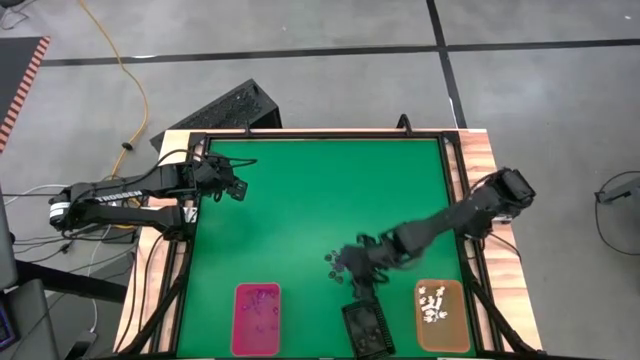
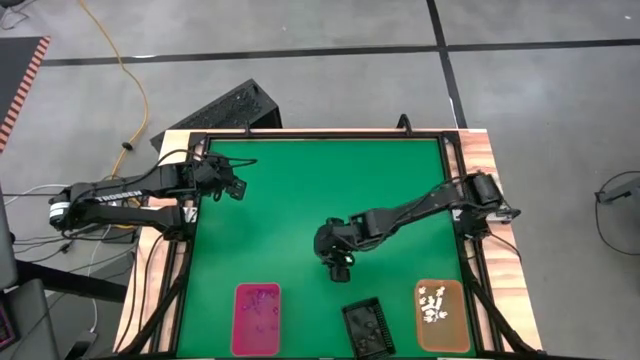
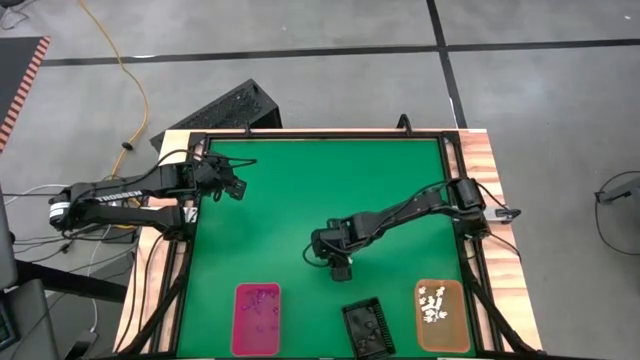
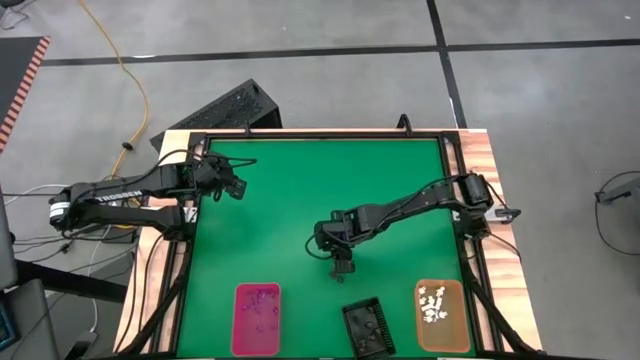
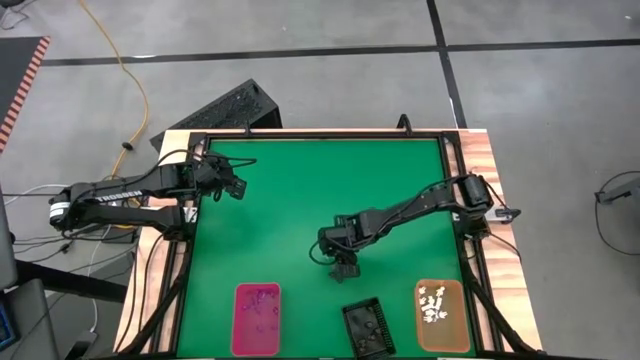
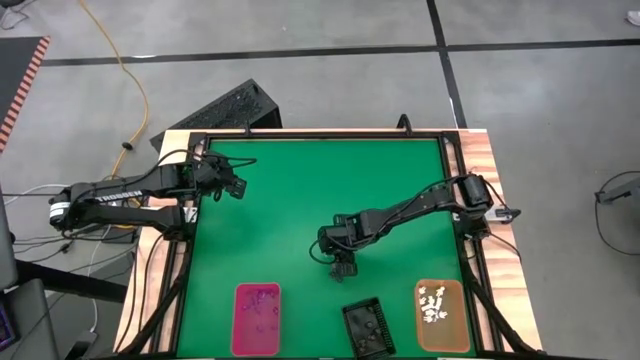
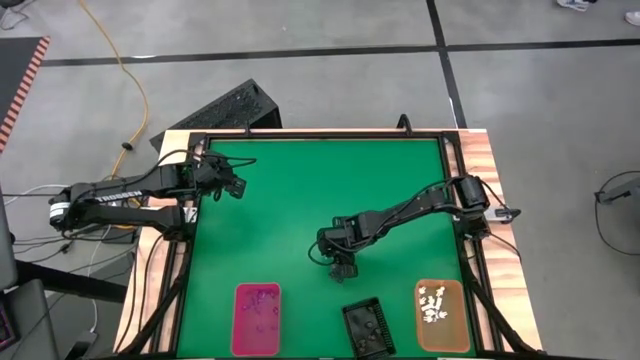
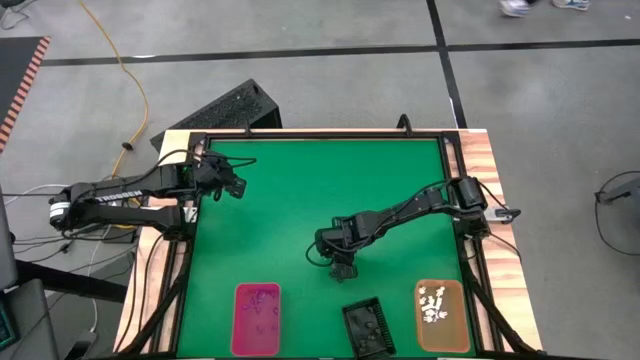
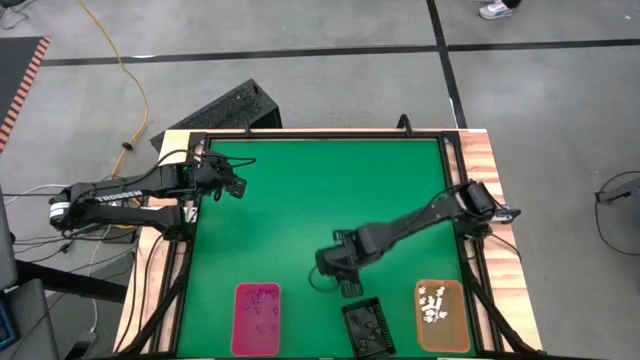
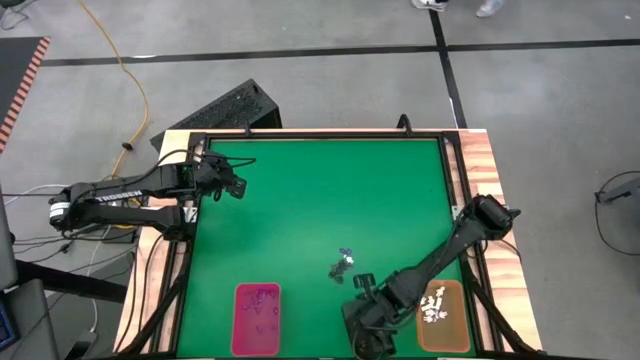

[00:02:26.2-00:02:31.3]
Task: Sort Halloween decoration
Put the black skull toy into the black organizing bin

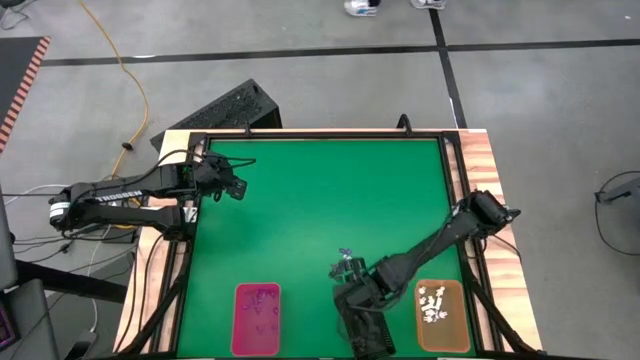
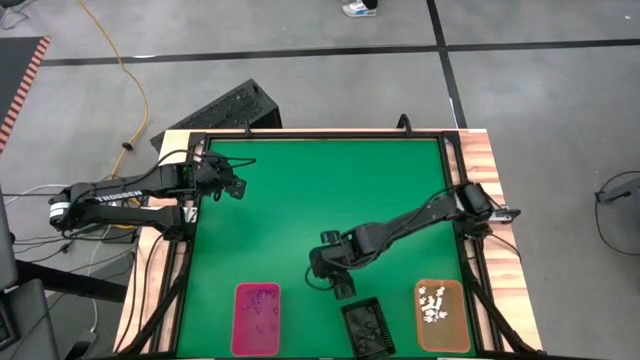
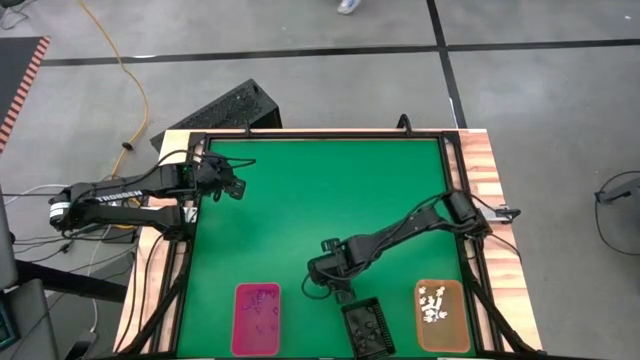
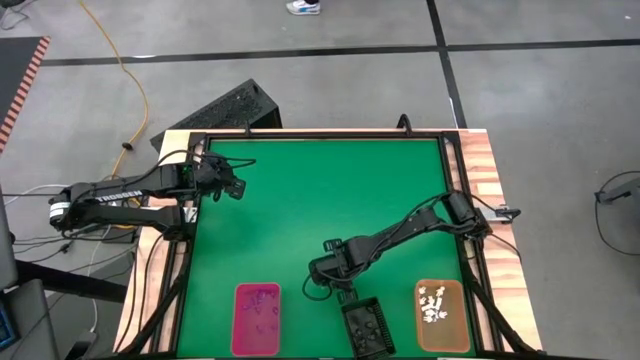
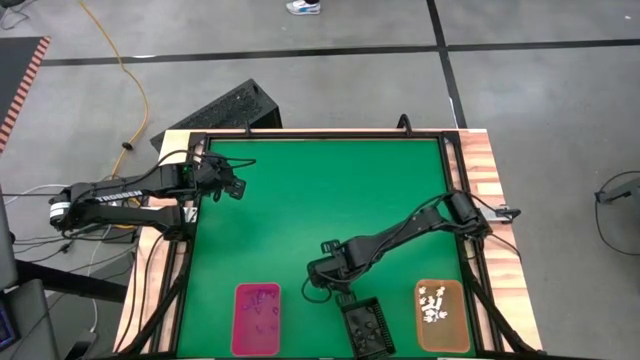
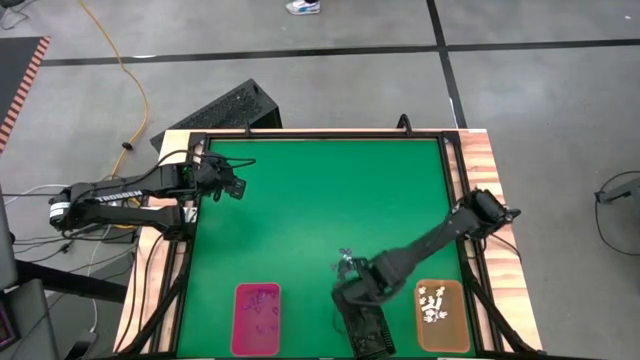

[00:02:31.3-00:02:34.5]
Put the black skull toy into the black organizing bin

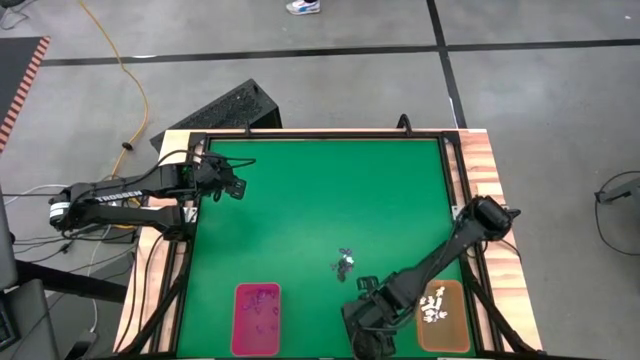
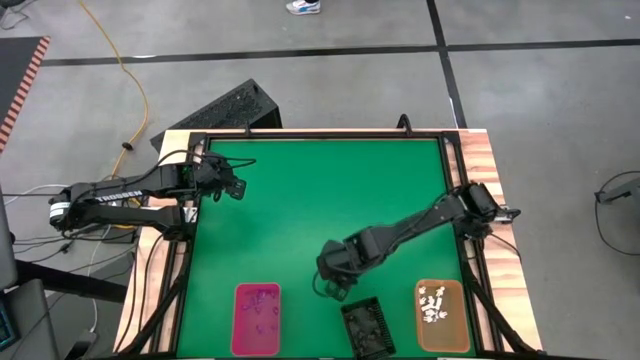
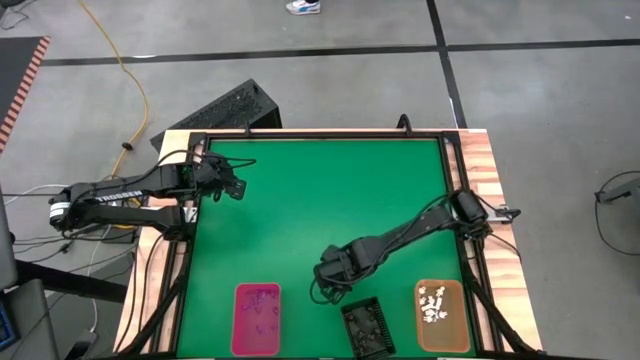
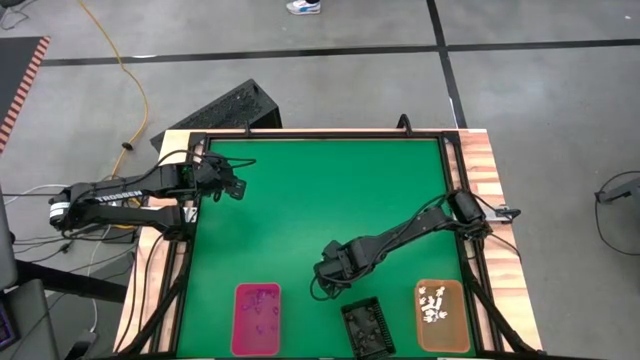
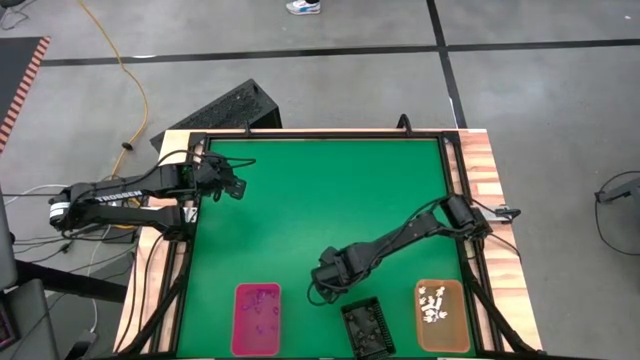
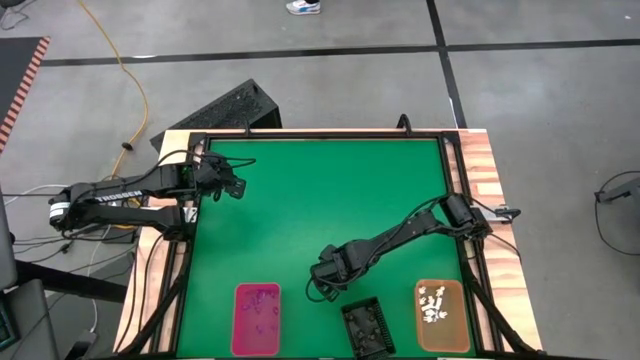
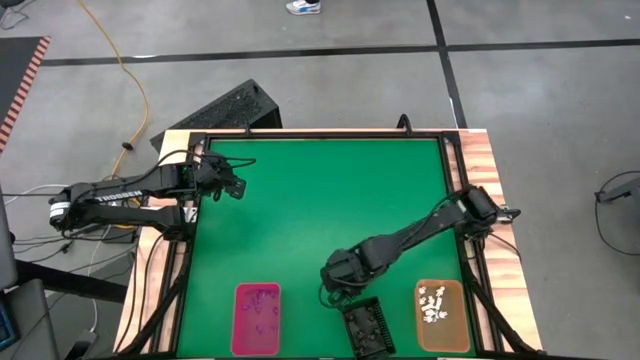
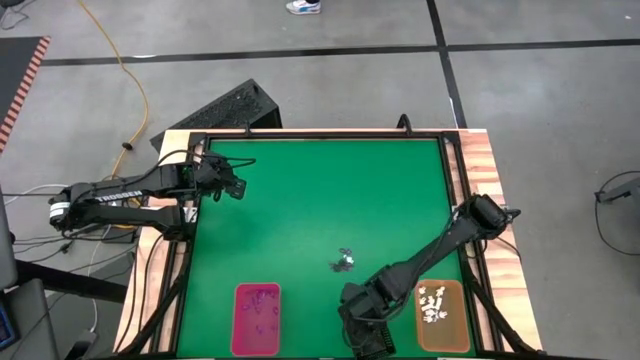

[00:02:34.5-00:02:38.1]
Put the black skull toy into the black organizing bin

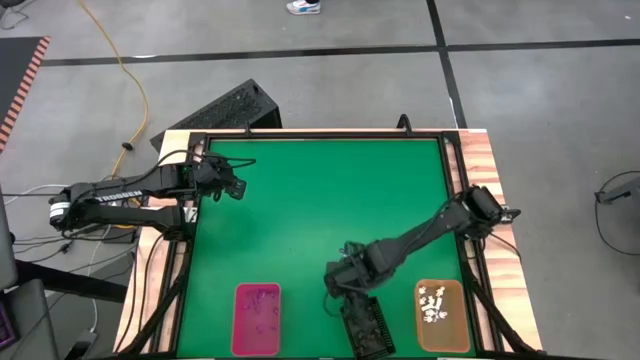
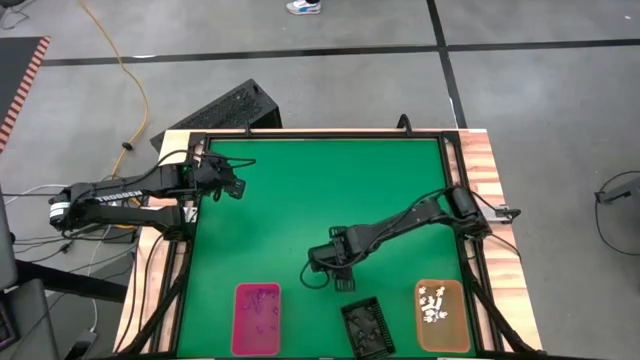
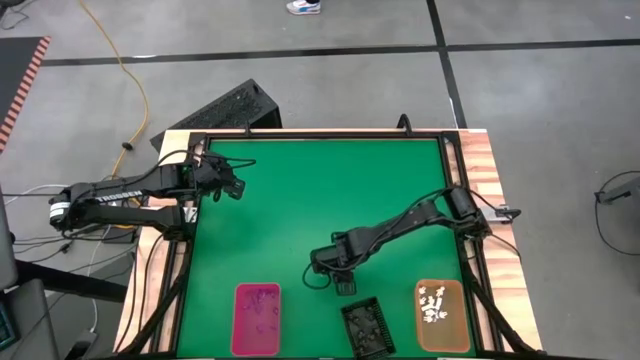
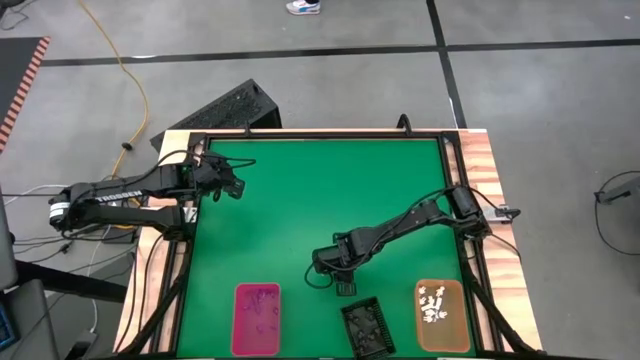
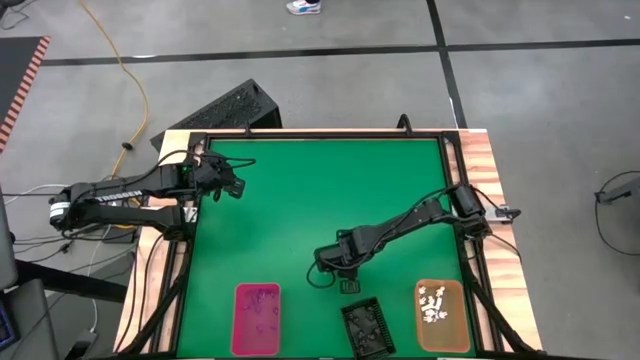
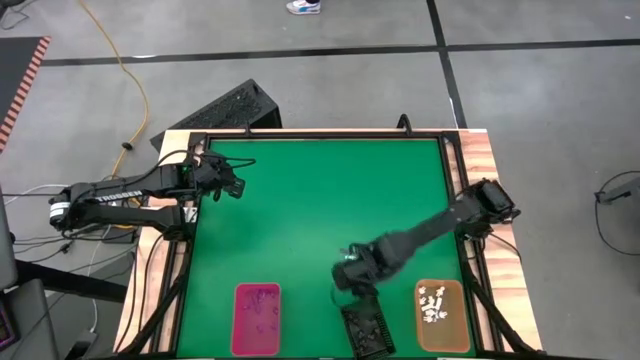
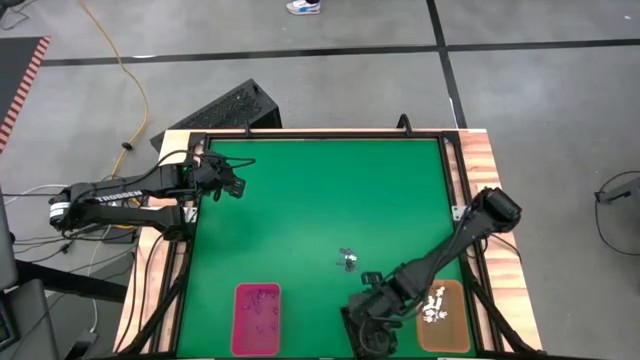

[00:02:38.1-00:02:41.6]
Put the black skull toy into the black organizing bin

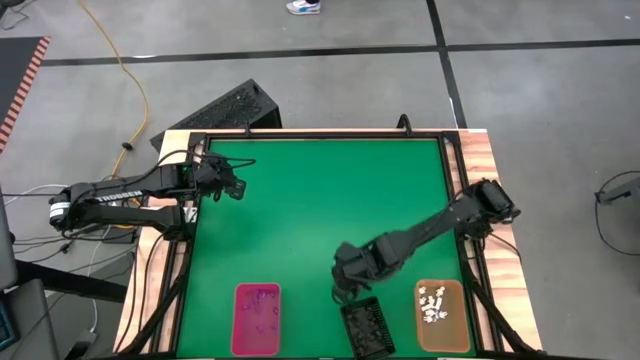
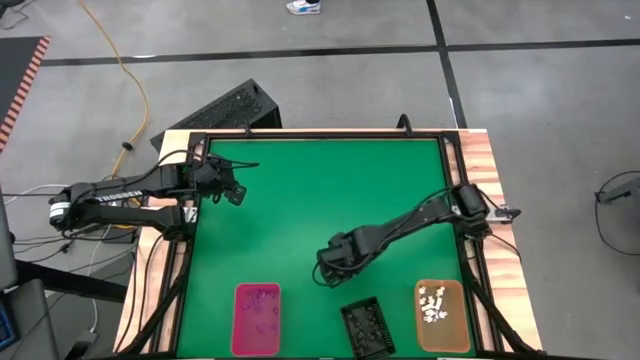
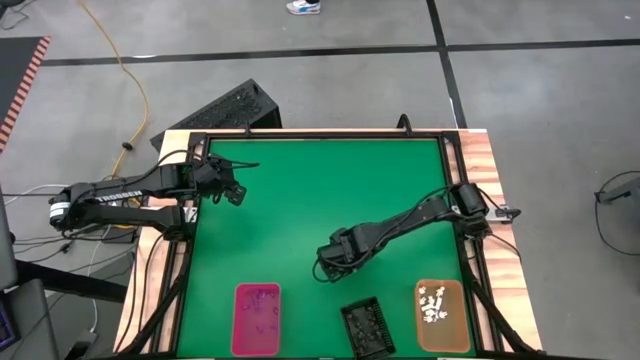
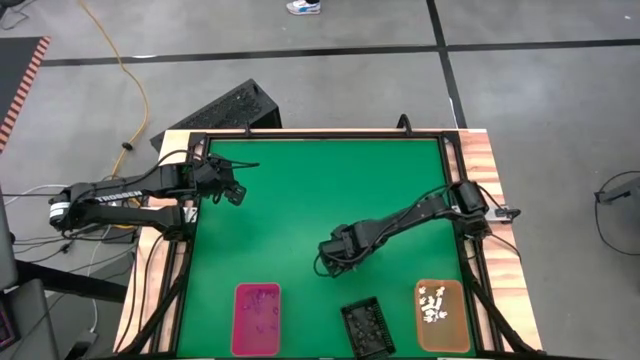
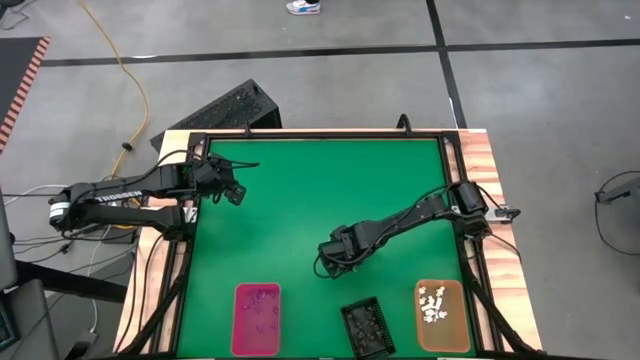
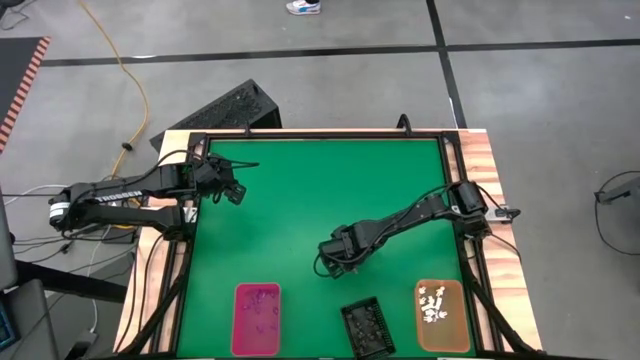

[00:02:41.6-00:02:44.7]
Put the black skull toy into the black organizing bin

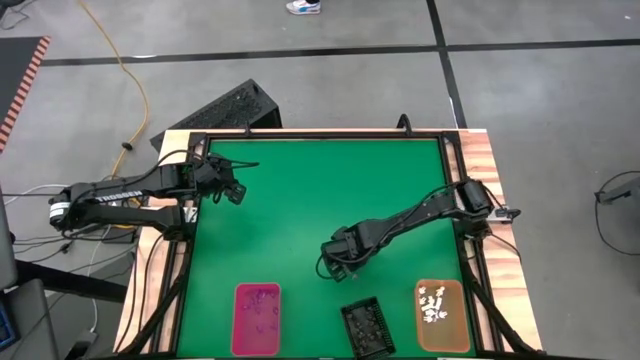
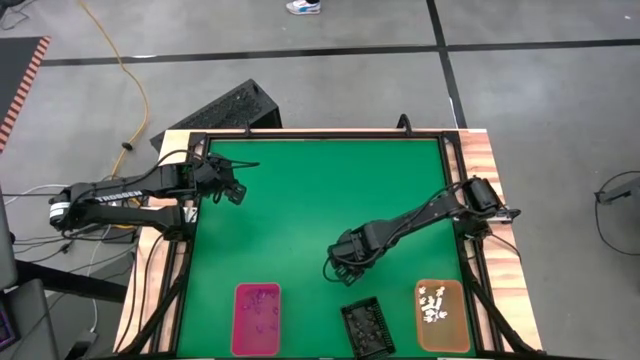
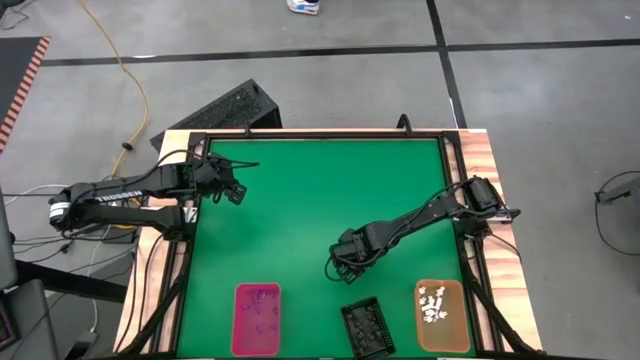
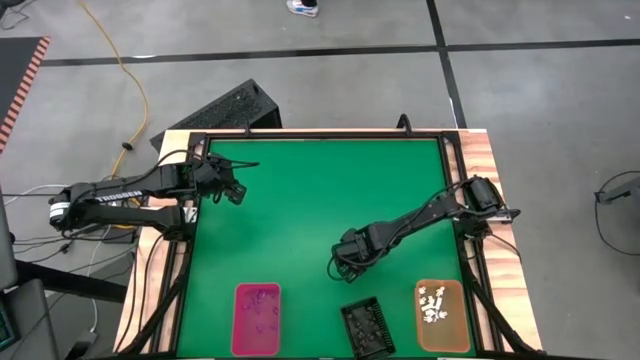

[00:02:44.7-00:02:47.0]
Put the black skull toy into the black organizing bin

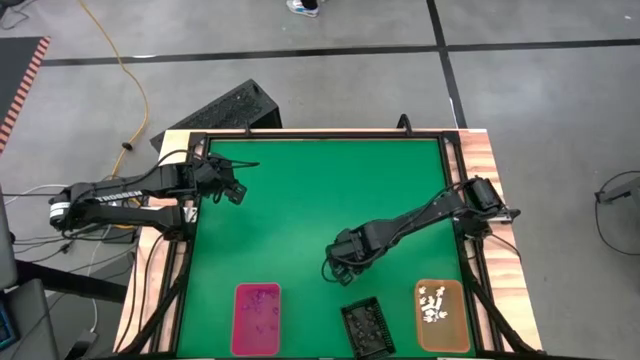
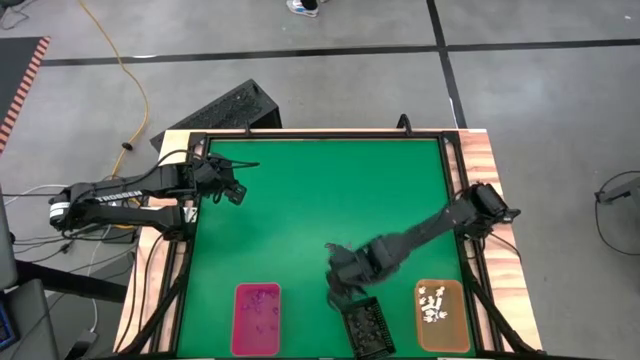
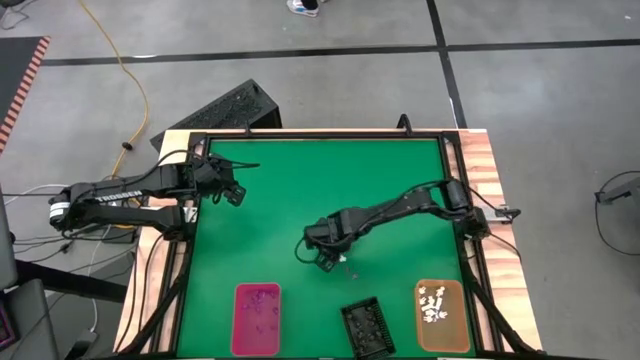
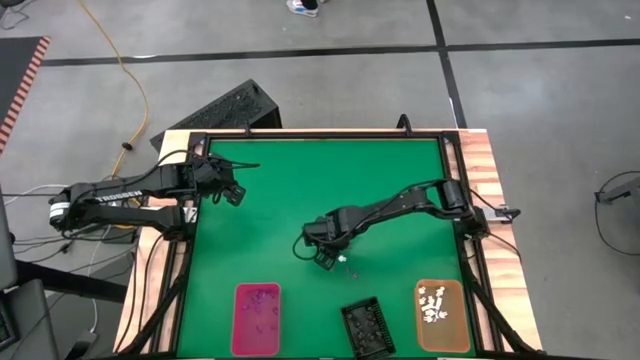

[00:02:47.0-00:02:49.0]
Put the black skull toy into the black organizing bin
